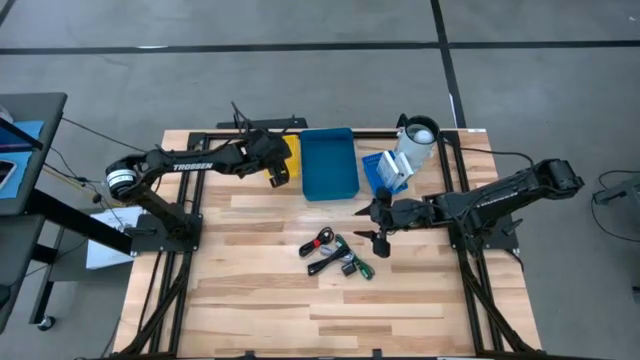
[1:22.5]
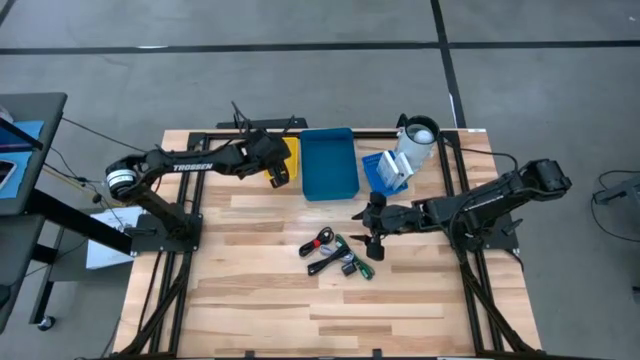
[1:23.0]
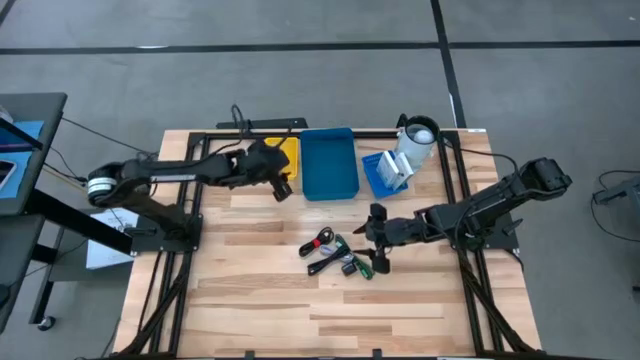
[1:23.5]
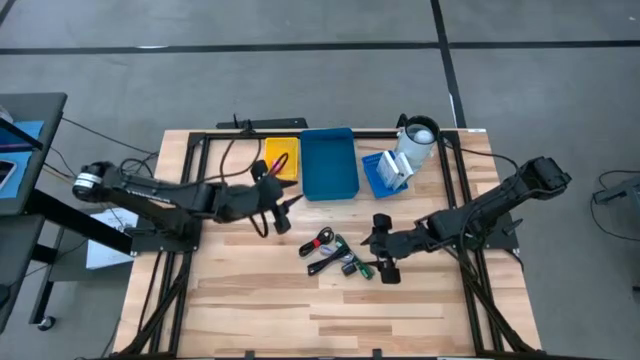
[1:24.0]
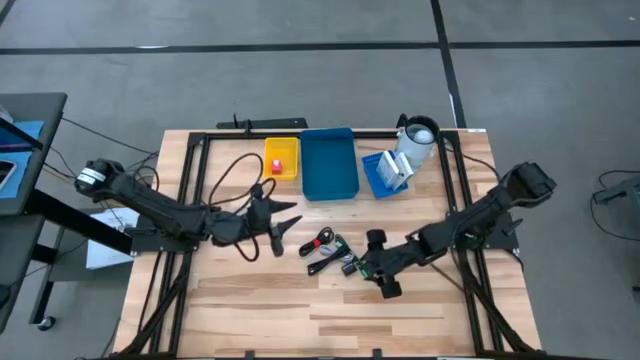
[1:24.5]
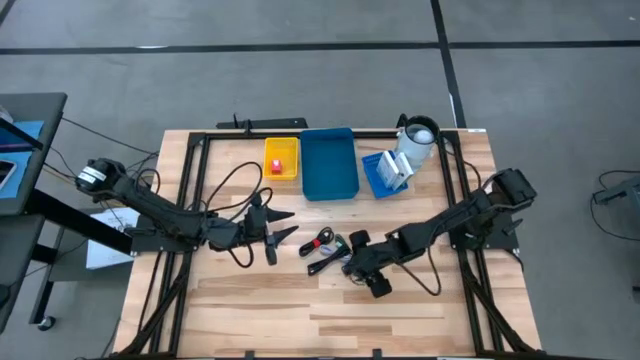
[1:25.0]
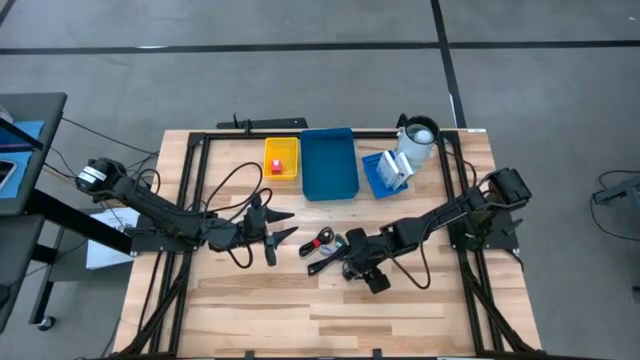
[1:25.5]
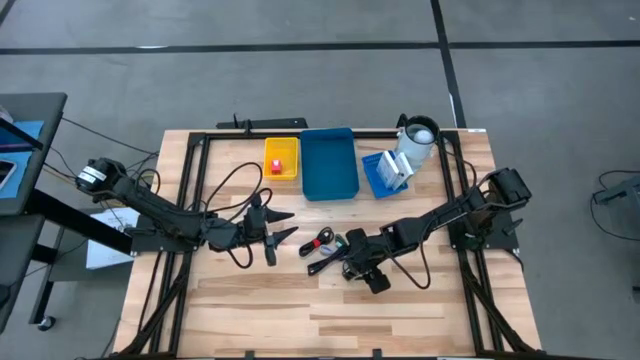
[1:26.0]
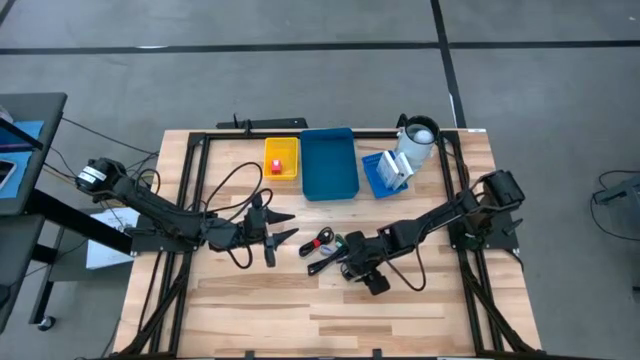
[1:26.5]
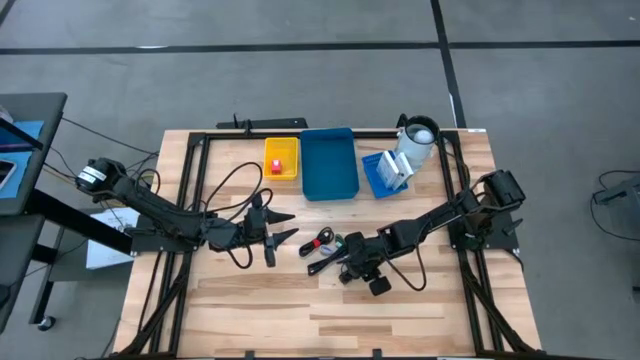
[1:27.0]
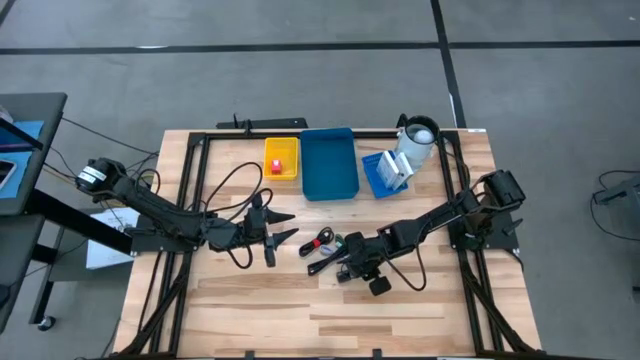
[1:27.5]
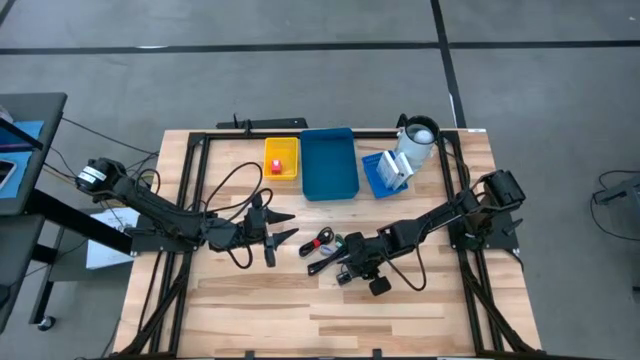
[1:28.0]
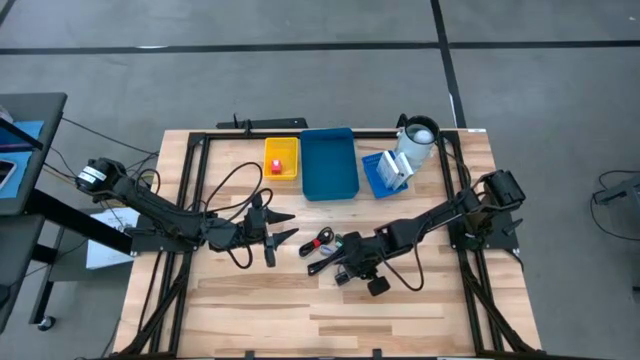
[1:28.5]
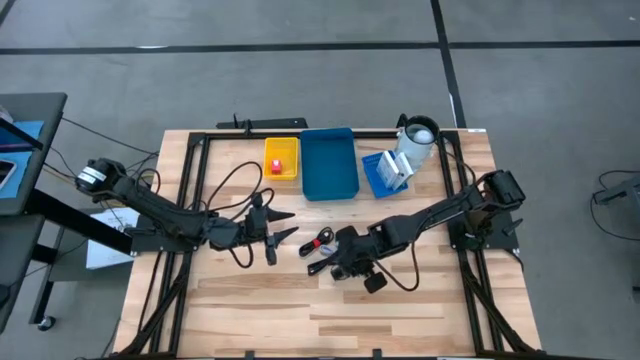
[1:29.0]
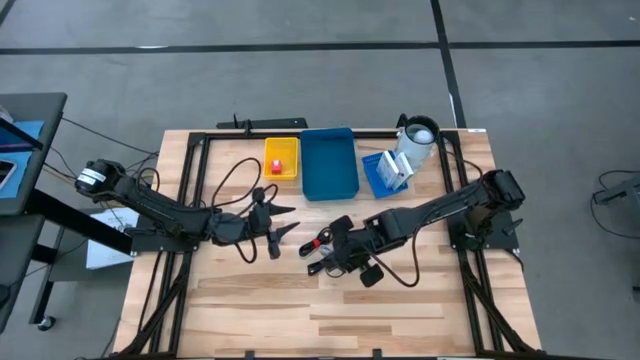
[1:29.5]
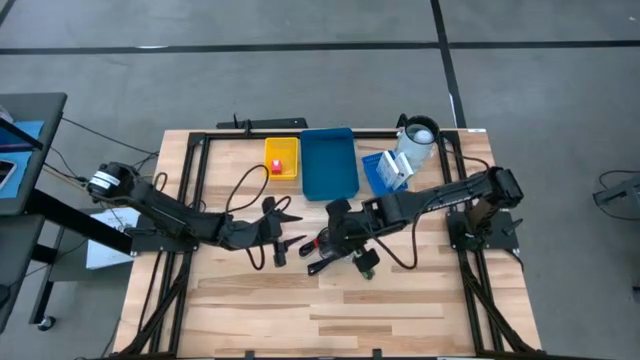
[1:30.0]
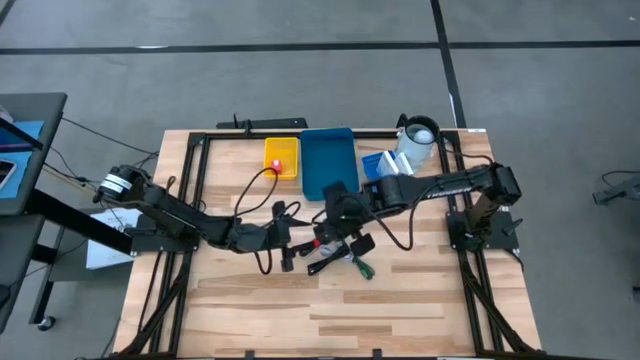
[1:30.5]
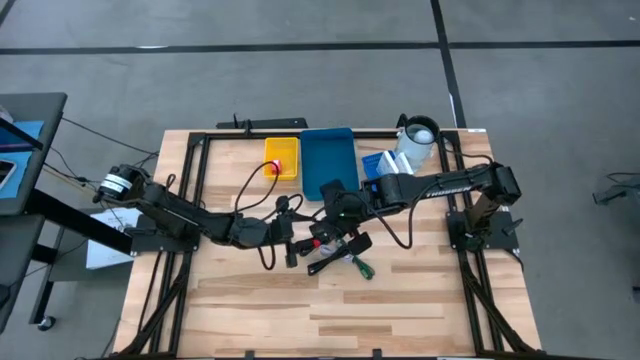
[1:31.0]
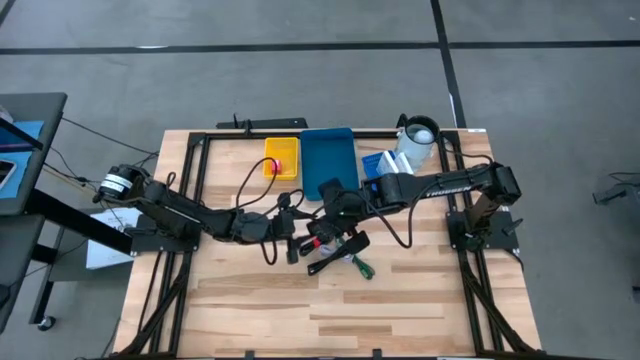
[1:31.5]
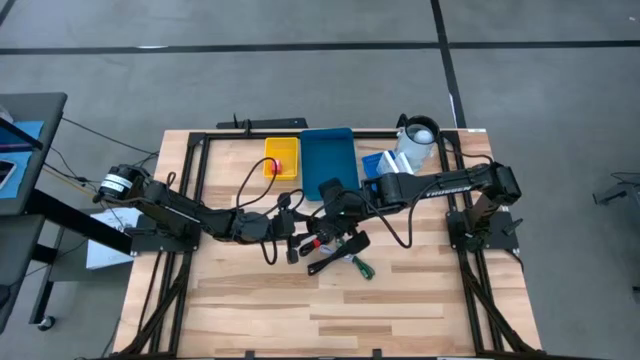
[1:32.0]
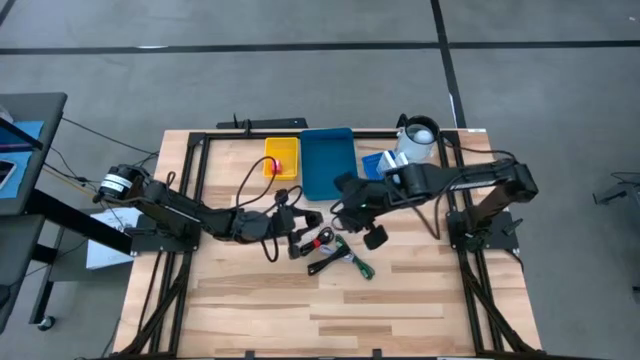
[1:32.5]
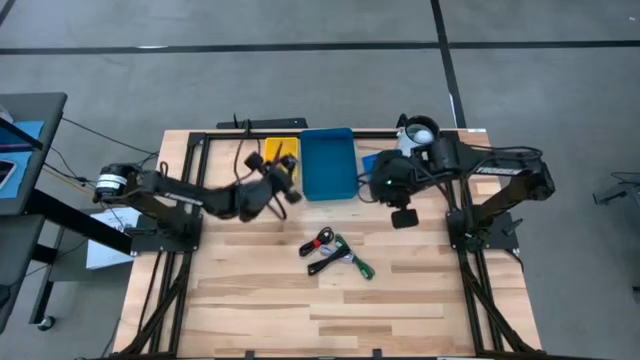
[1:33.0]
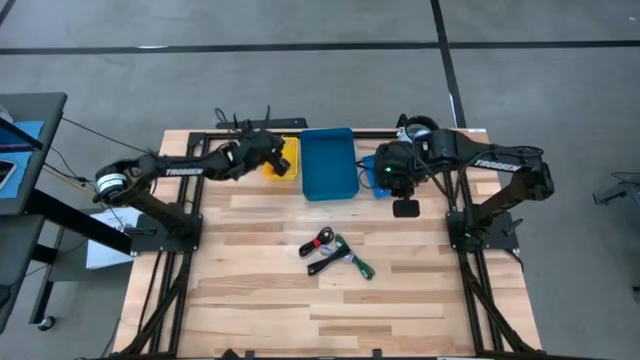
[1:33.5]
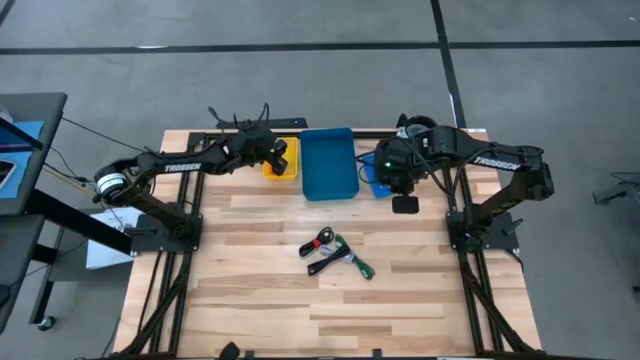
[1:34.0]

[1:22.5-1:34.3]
Task: Pick and place items into bin
Put the black charger adapter into the yellow basket

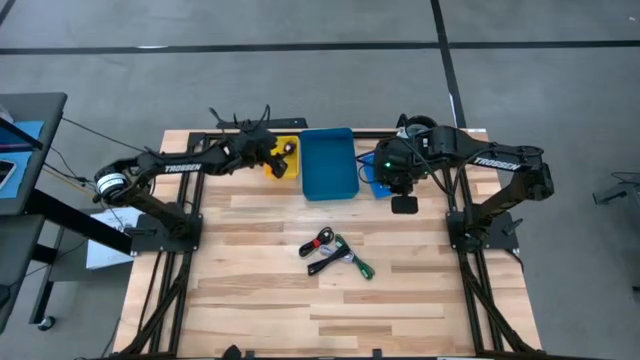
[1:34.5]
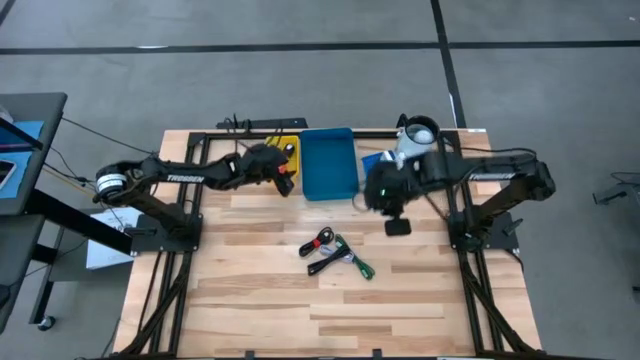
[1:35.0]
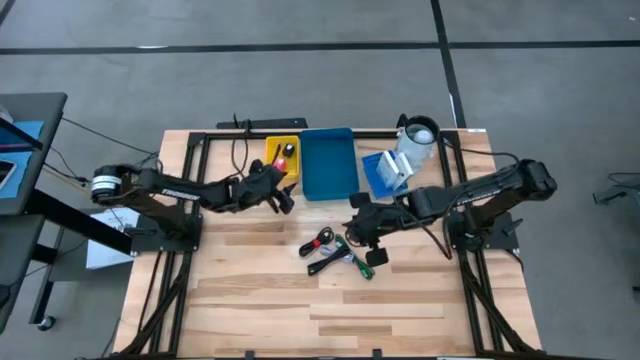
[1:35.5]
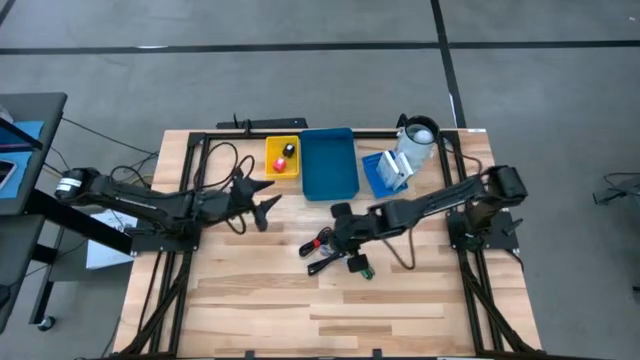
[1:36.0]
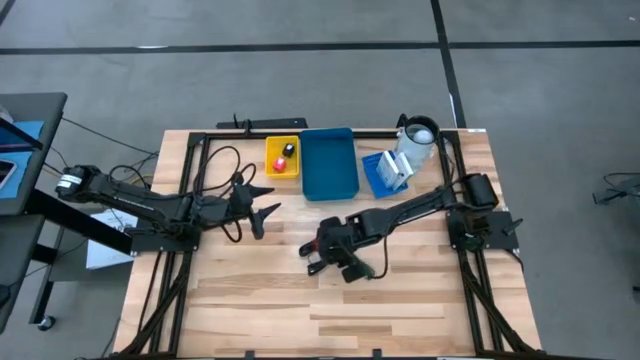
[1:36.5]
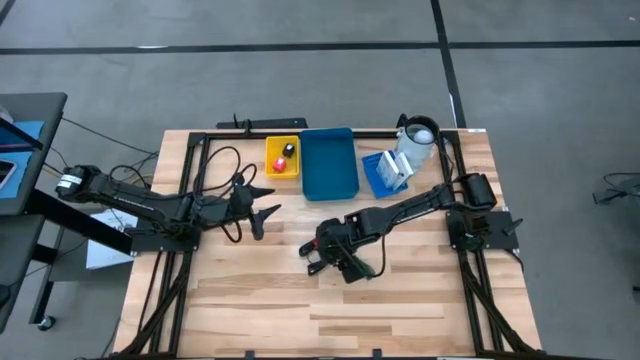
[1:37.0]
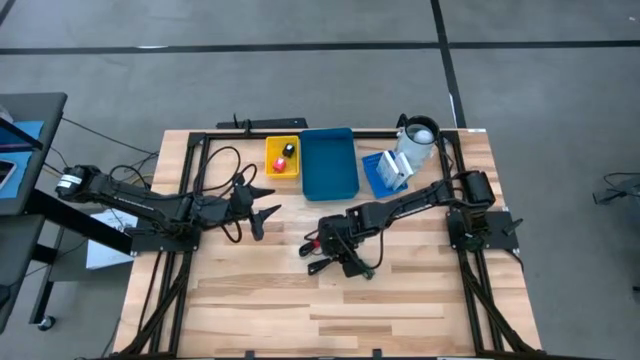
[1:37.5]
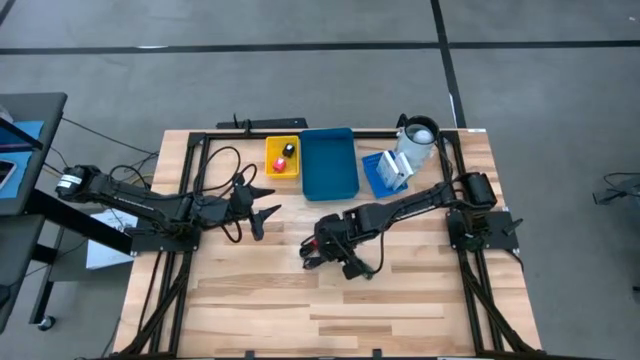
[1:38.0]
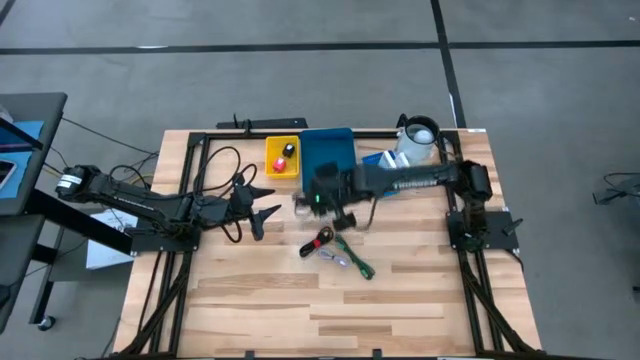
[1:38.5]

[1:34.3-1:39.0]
Put the black charger cable into the blue bin

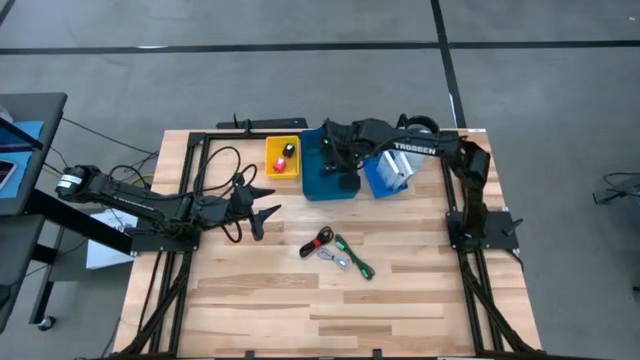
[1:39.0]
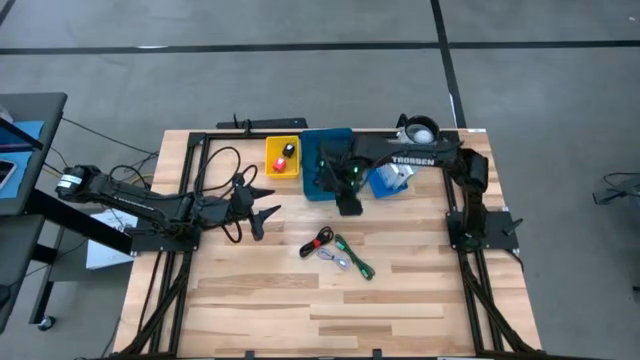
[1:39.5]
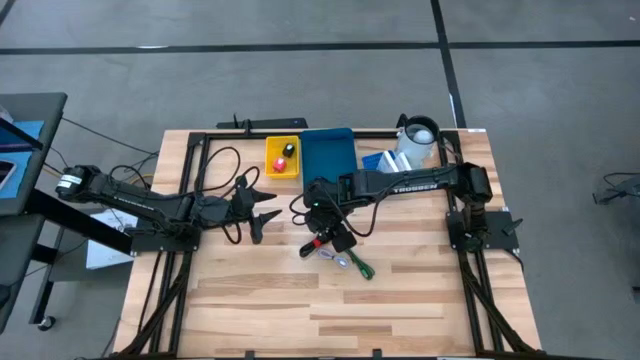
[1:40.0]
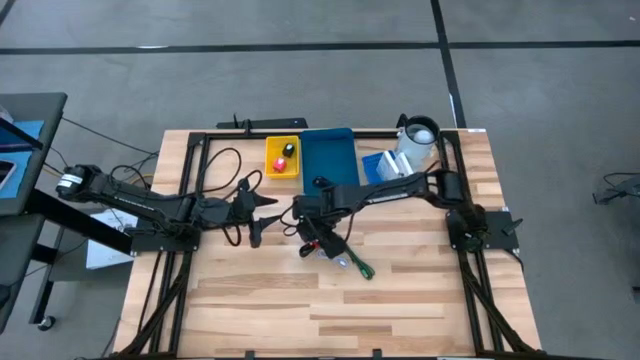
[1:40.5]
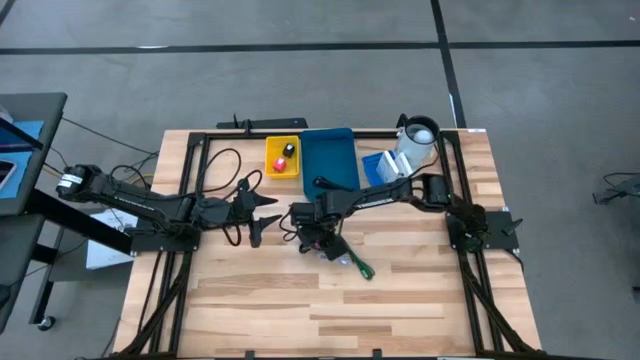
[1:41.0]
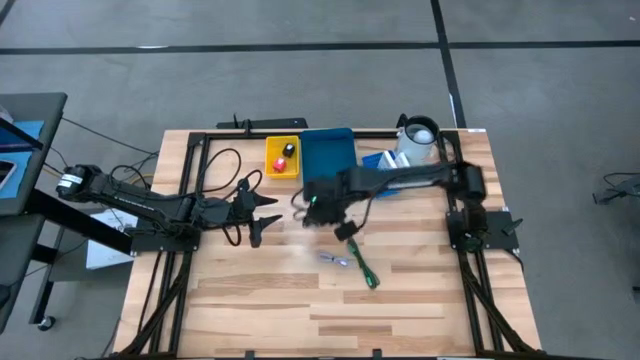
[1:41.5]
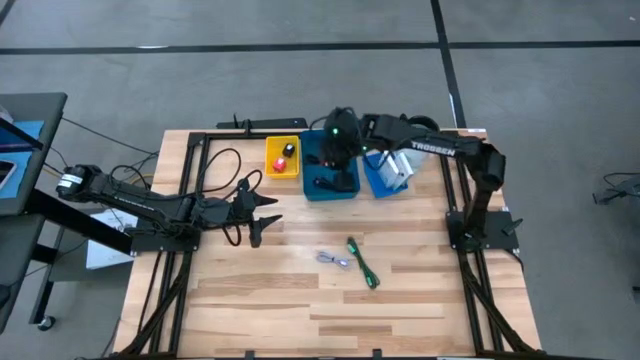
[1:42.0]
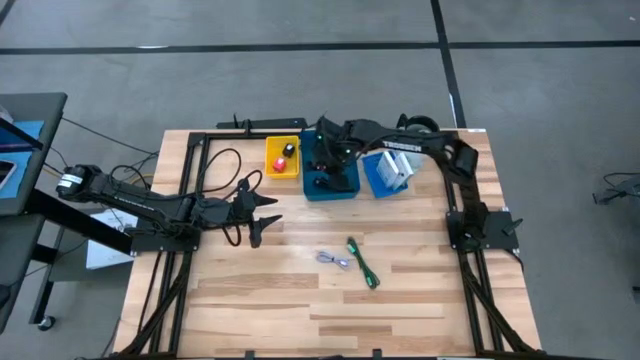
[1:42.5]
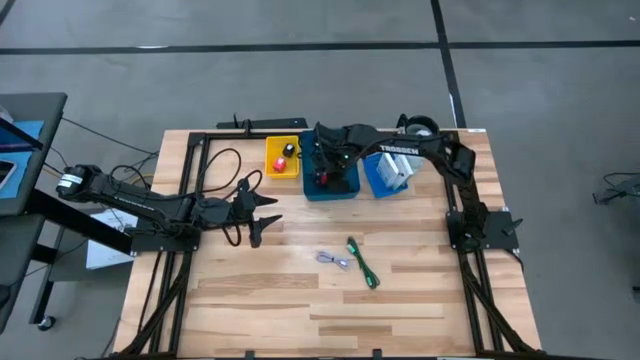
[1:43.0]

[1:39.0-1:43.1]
Put the black charger cable into the blue bin
